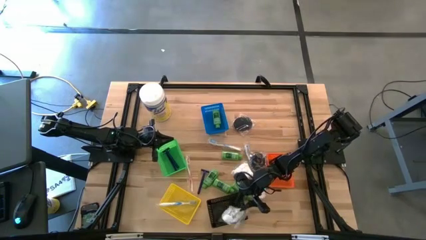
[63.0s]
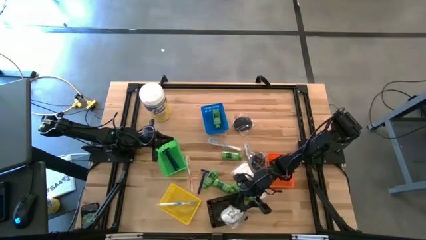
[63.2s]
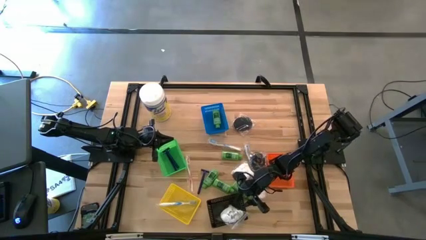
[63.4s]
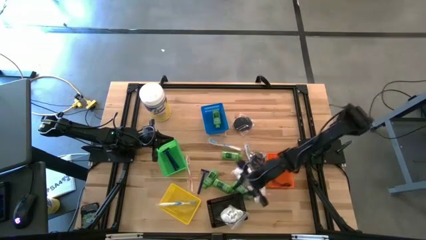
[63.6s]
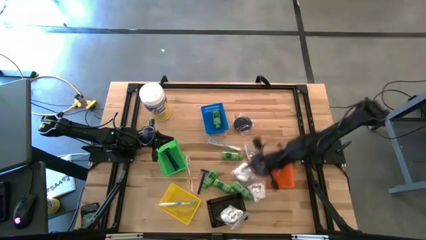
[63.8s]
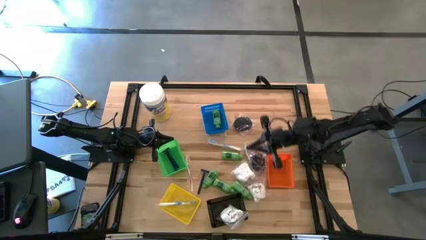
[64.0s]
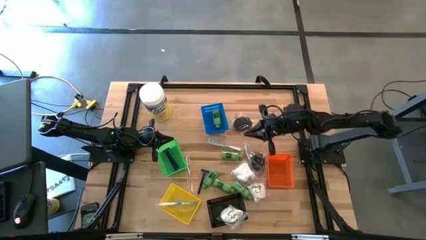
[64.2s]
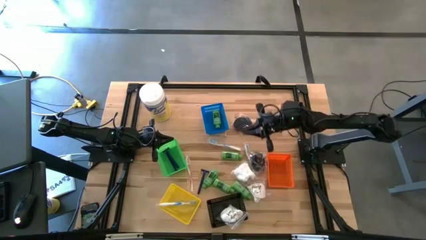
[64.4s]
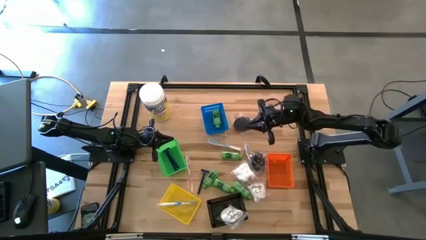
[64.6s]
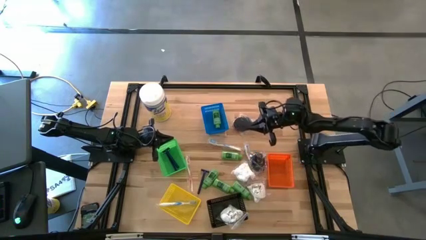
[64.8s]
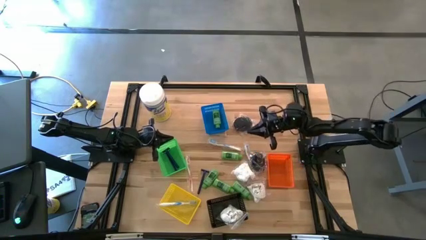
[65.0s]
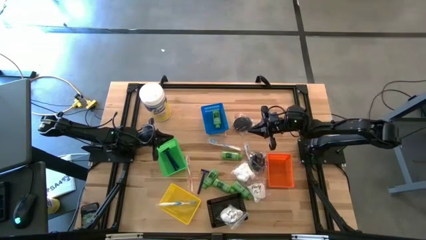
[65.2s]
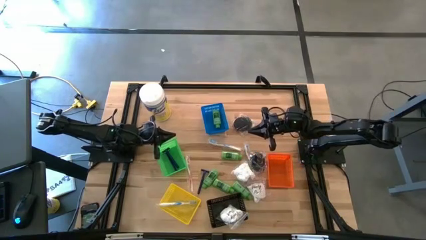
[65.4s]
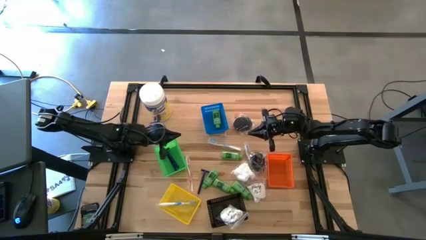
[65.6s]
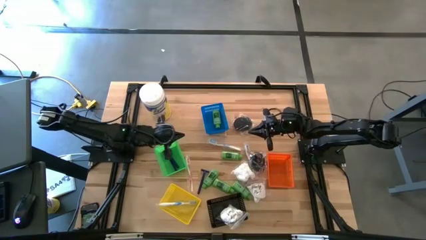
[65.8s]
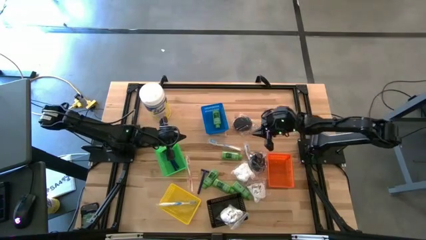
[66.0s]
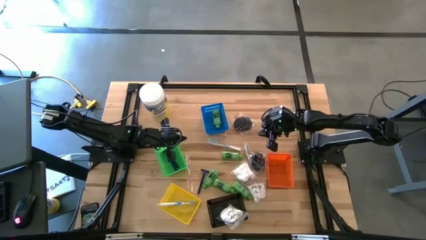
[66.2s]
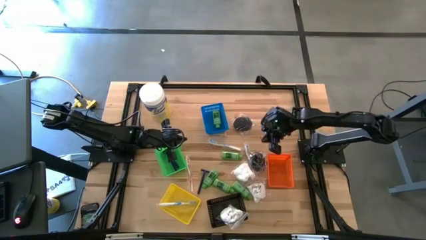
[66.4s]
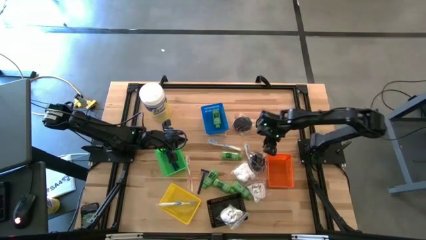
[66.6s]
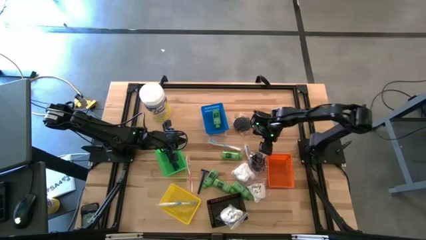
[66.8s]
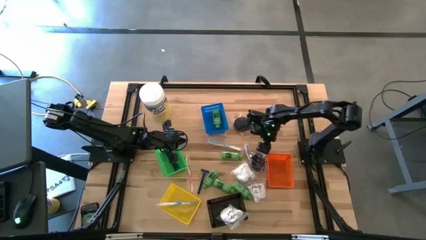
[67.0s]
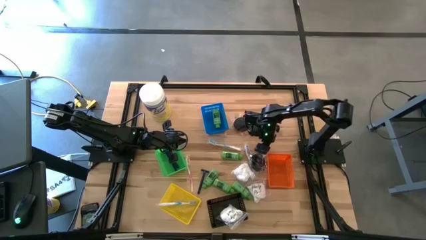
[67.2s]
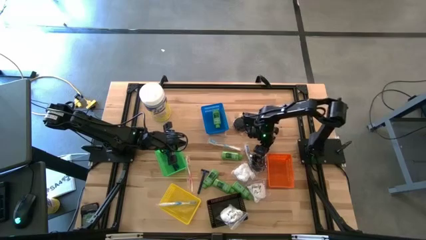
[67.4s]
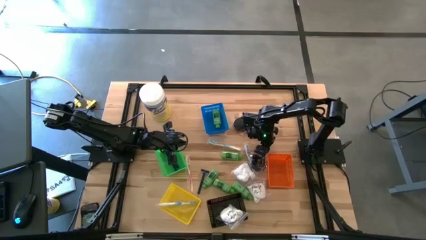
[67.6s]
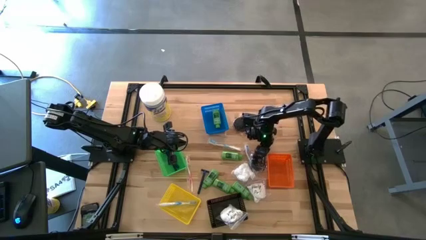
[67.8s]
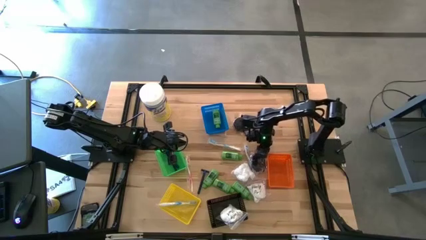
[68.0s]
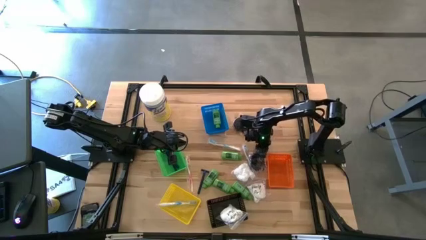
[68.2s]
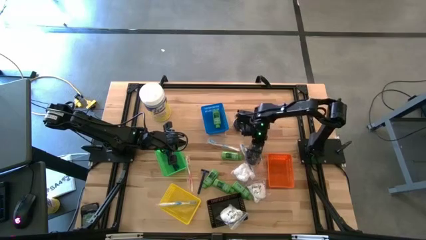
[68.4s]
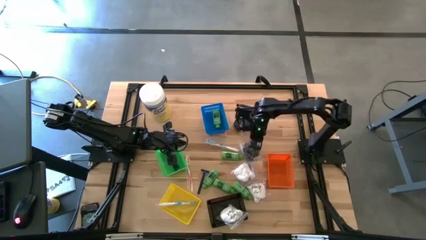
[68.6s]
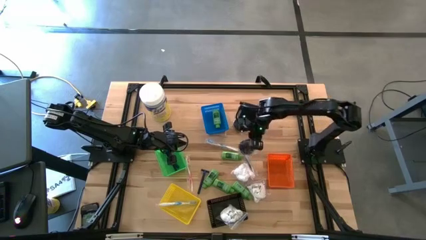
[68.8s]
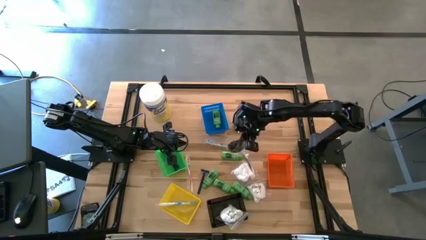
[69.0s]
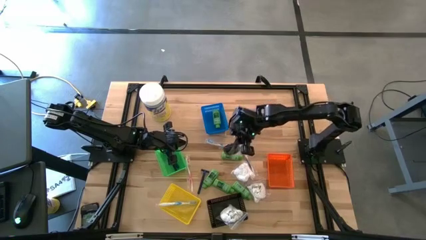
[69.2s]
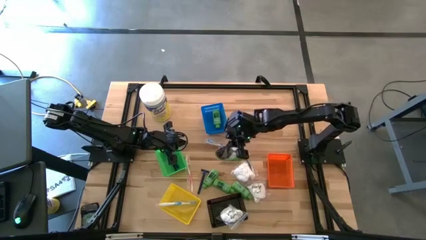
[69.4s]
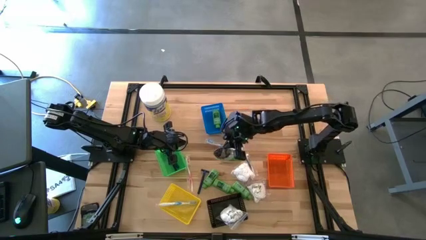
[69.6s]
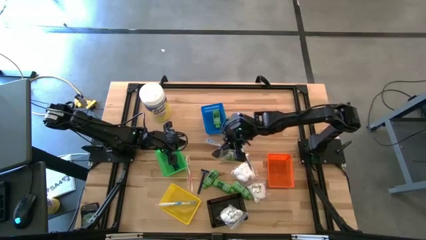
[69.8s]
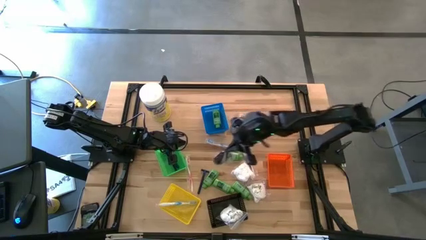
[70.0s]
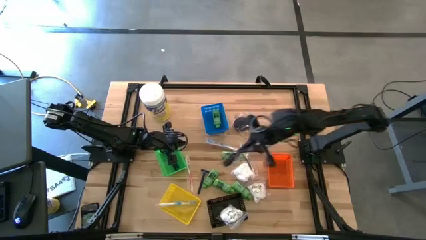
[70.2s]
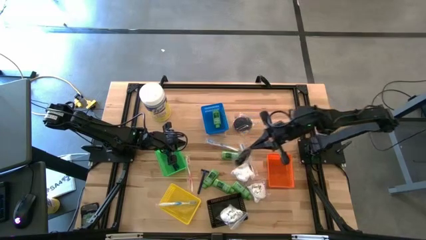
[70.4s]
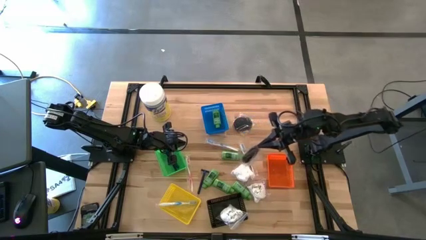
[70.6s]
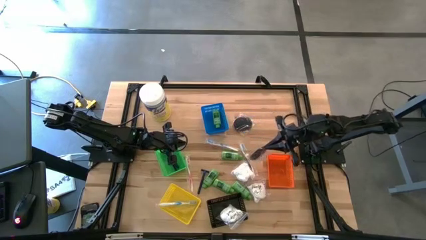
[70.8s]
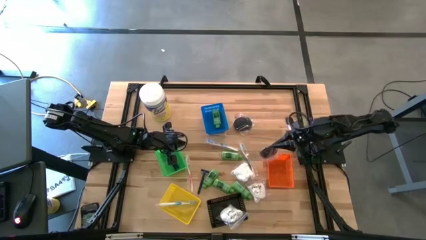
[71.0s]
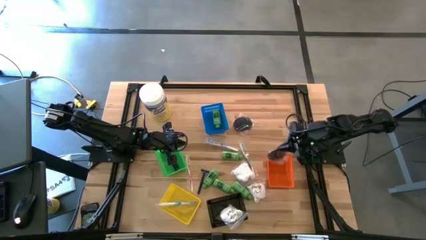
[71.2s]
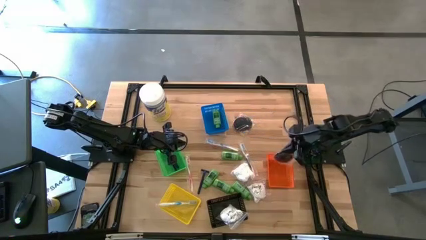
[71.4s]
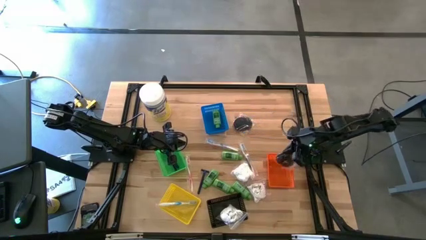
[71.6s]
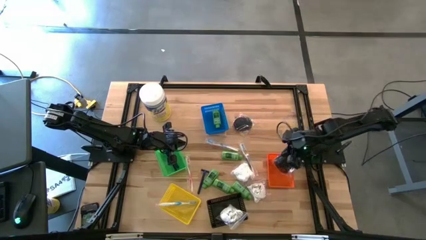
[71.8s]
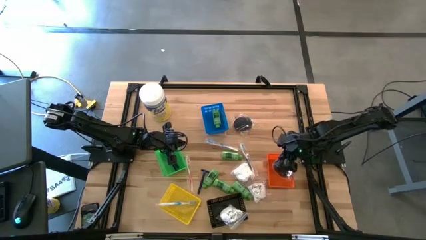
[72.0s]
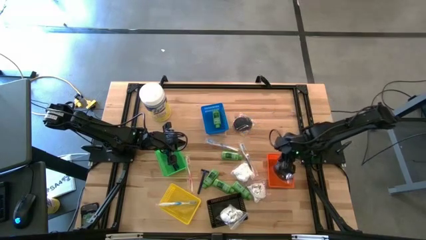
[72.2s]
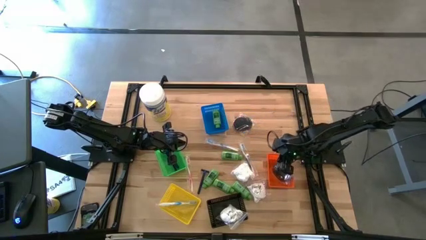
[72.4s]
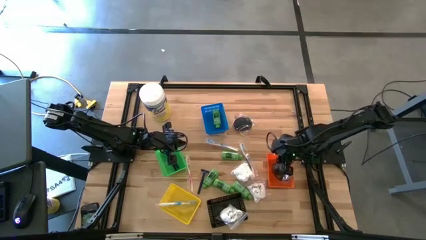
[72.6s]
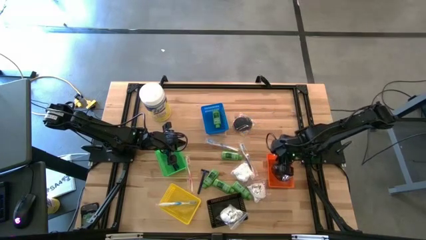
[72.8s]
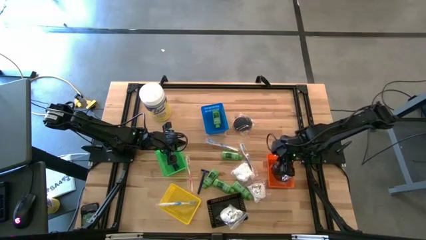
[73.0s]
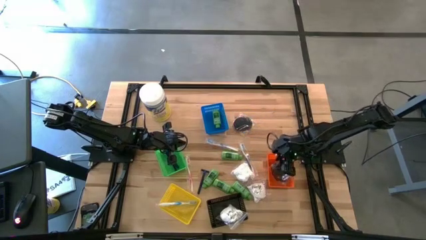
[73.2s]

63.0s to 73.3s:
Task: Pick & Place Travel size toiletries
Put the hair brush into the orange bin

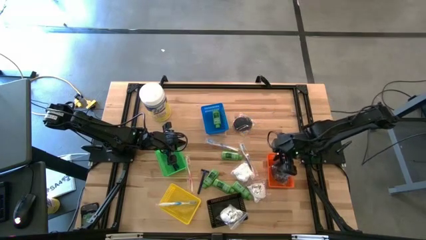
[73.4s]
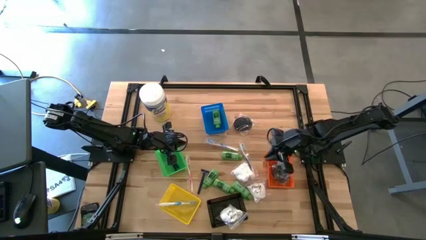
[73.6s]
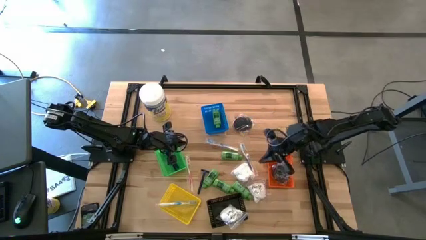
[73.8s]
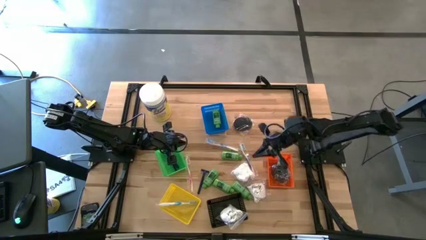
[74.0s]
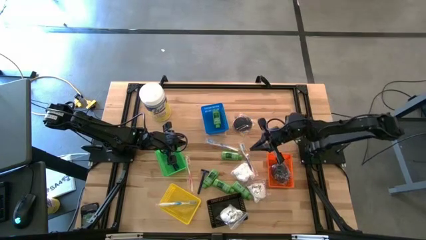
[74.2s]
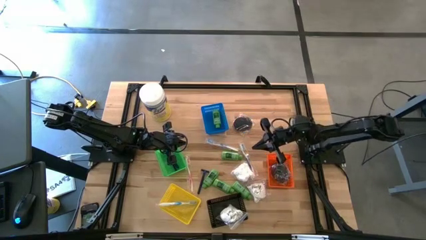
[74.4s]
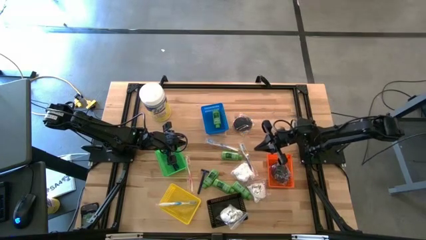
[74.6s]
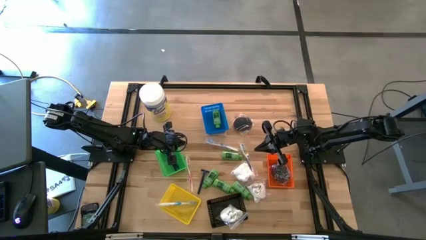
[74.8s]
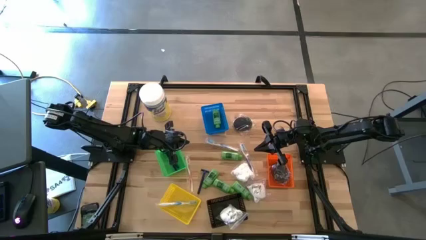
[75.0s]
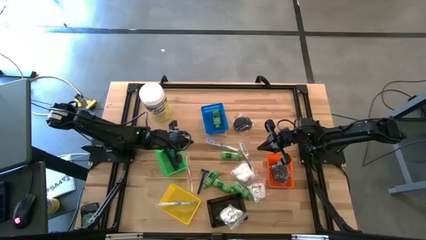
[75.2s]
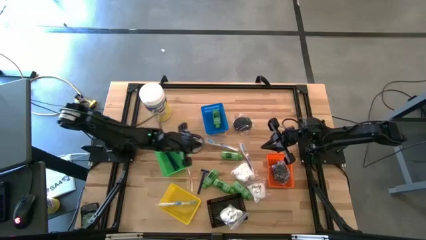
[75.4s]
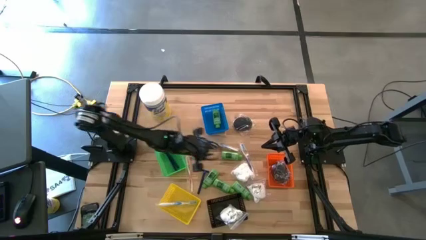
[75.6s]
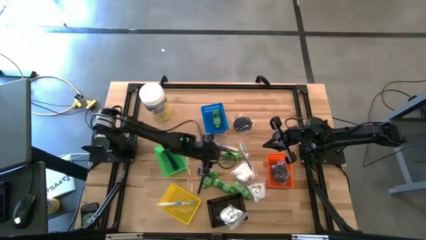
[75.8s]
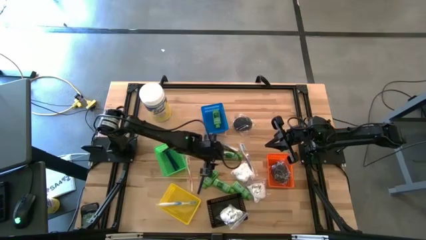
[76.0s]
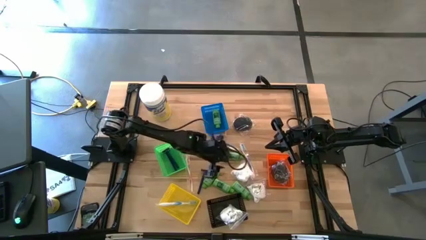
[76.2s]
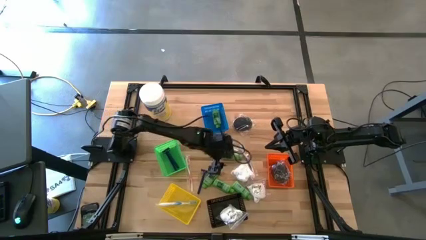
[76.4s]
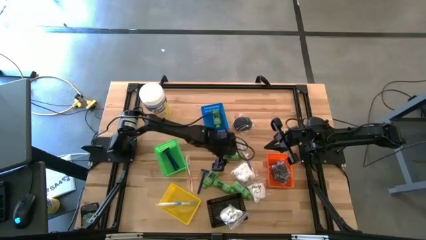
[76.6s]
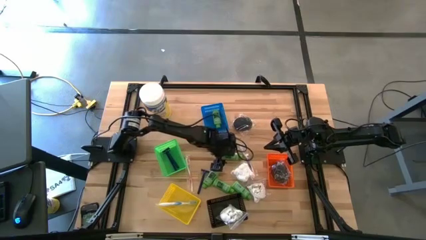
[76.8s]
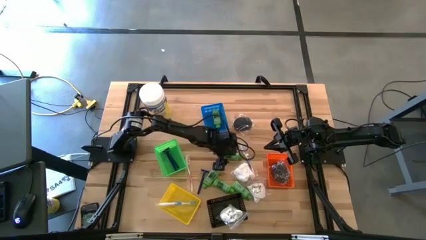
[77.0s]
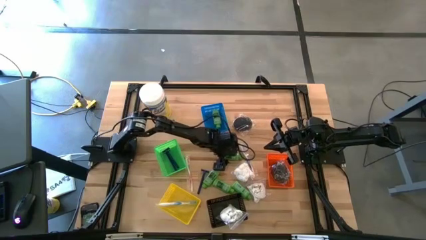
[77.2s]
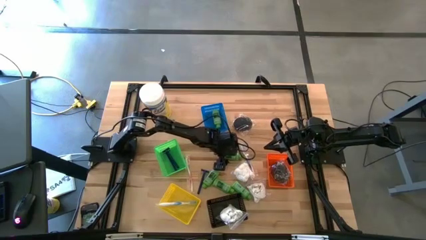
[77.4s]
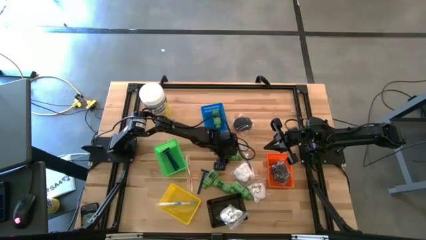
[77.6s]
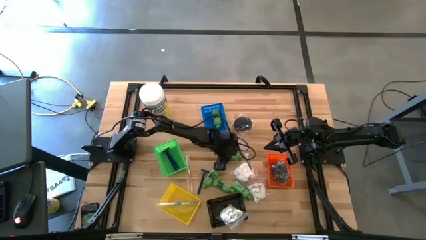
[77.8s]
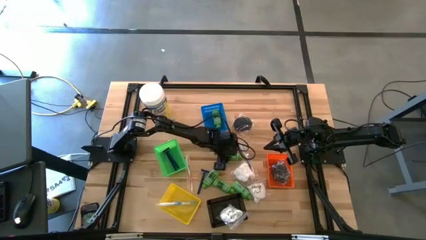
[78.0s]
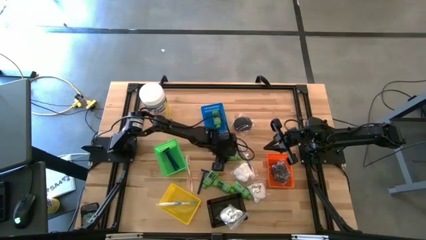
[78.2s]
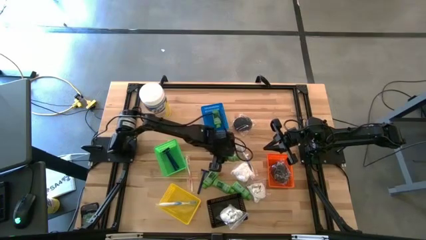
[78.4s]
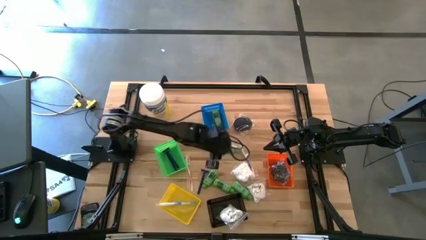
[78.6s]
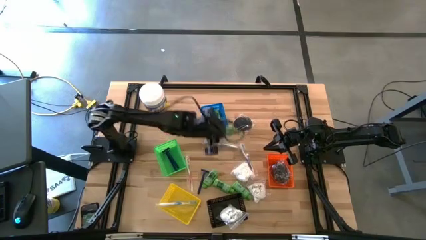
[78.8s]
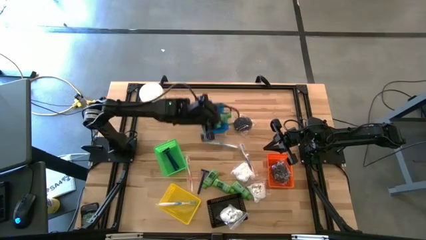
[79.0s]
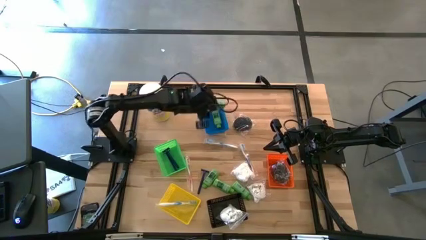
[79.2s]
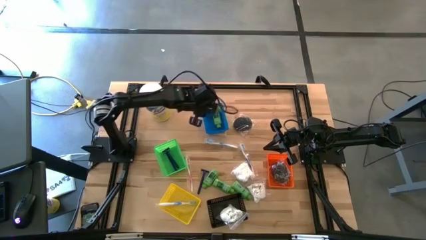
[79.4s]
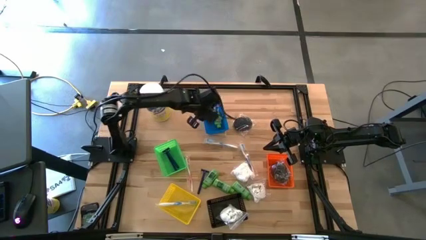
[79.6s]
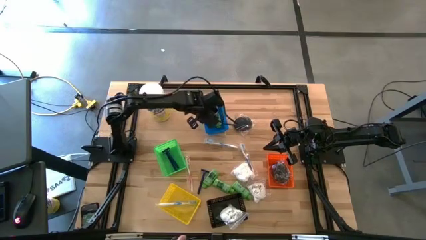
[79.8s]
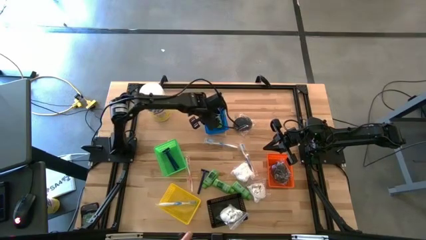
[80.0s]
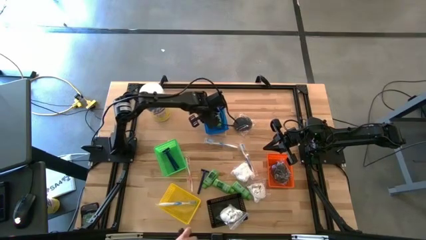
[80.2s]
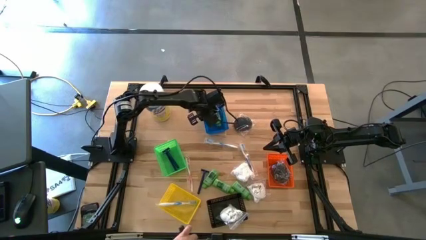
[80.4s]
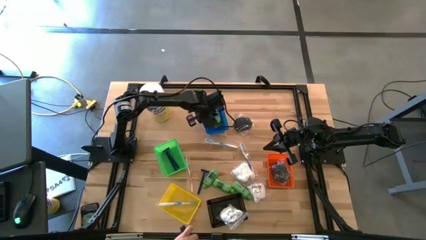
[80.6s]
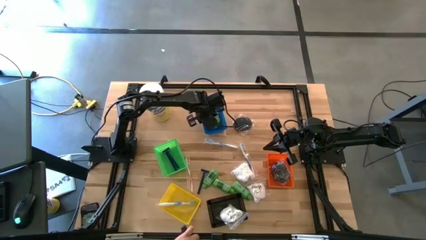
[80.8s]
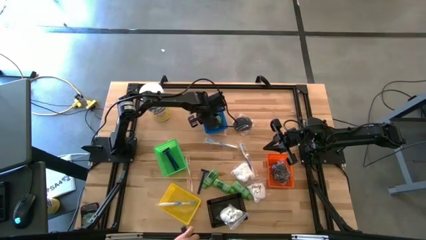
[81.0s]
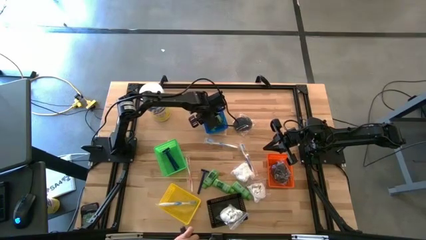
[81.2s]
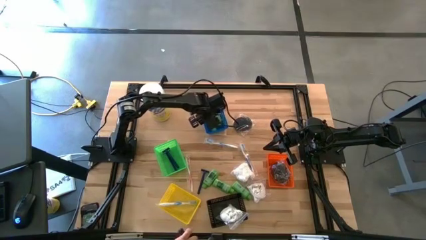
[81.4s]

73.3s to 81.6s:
Put the shampoo bottle into the blue bin
